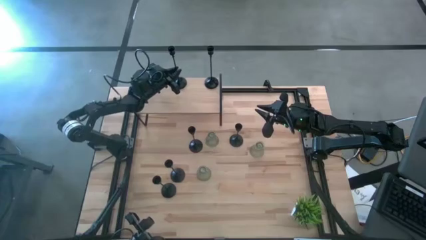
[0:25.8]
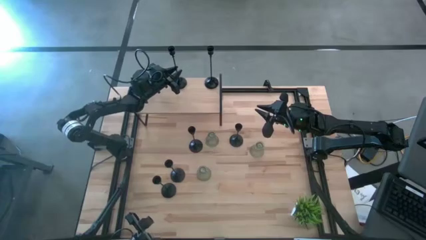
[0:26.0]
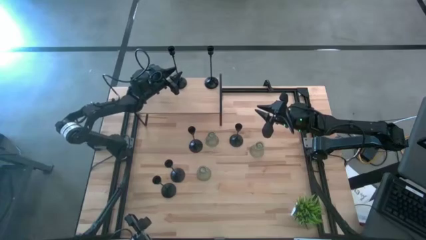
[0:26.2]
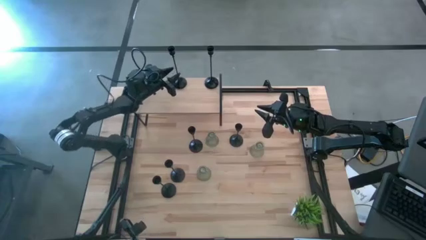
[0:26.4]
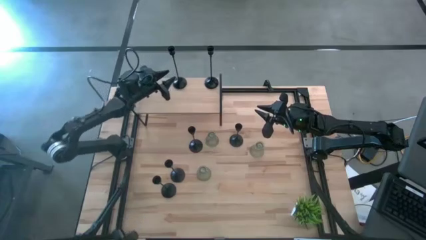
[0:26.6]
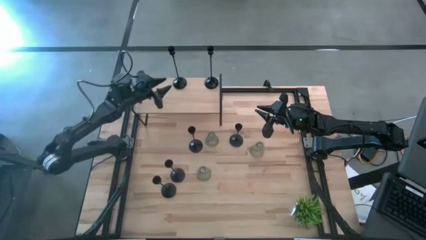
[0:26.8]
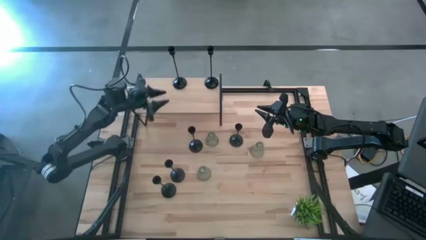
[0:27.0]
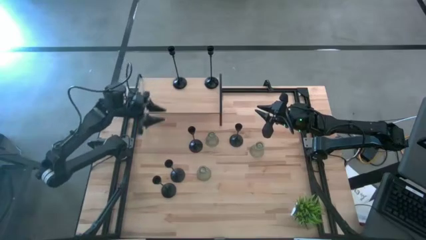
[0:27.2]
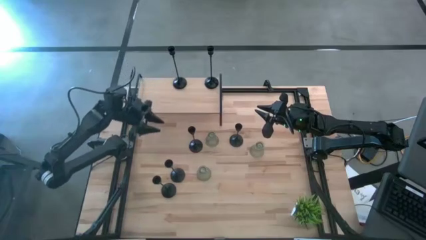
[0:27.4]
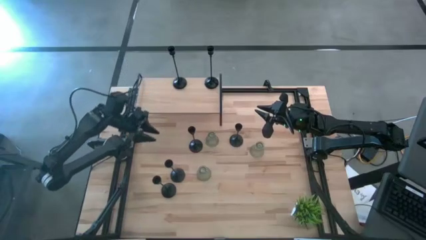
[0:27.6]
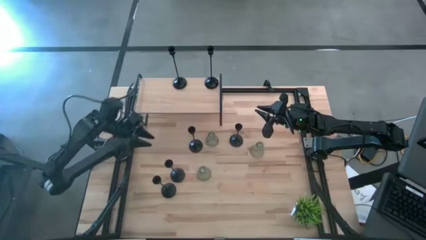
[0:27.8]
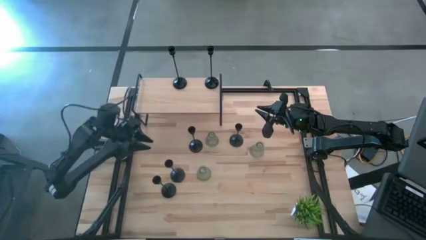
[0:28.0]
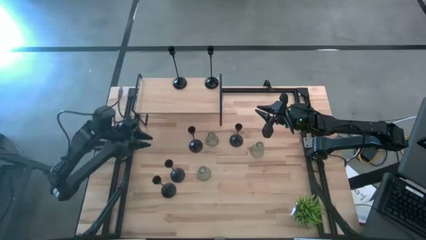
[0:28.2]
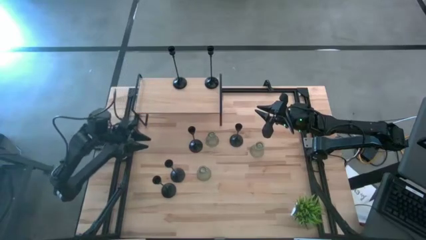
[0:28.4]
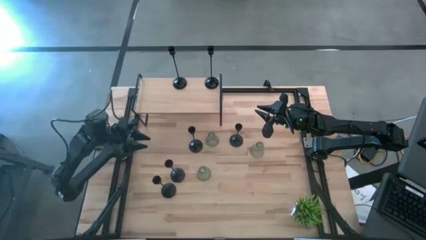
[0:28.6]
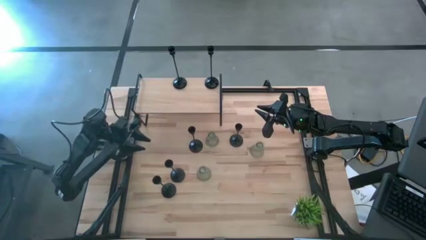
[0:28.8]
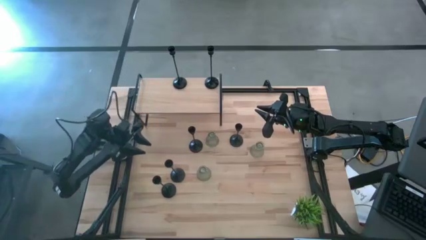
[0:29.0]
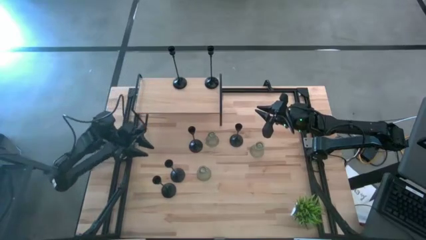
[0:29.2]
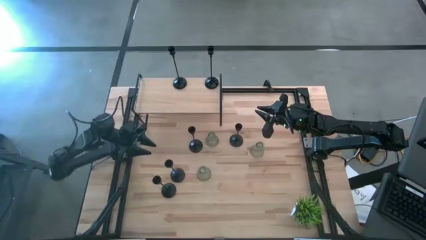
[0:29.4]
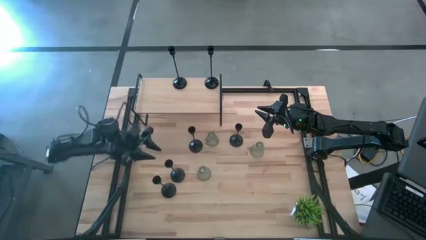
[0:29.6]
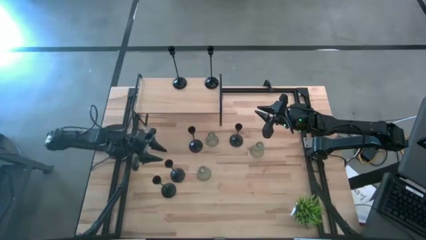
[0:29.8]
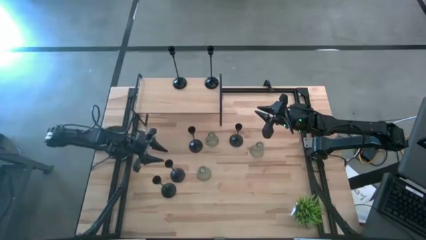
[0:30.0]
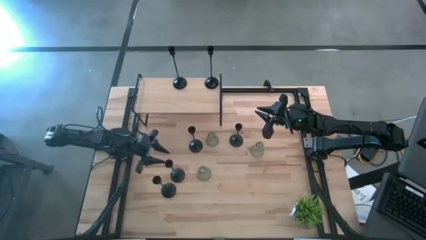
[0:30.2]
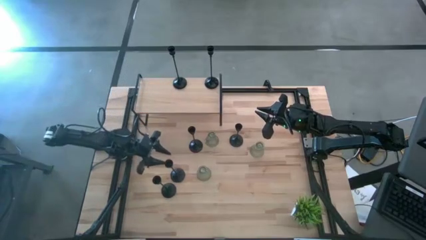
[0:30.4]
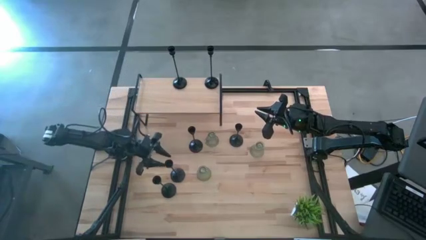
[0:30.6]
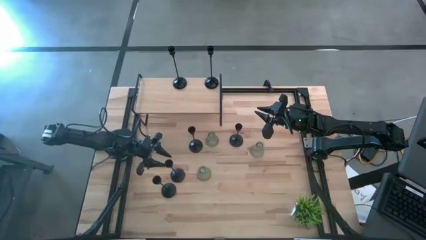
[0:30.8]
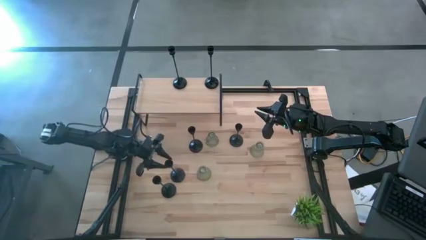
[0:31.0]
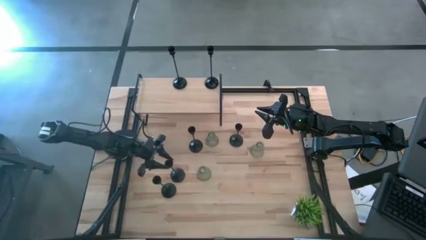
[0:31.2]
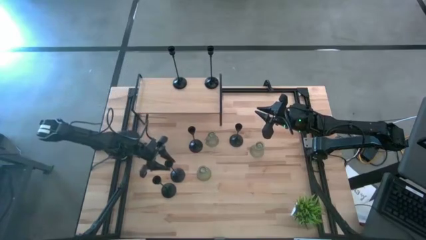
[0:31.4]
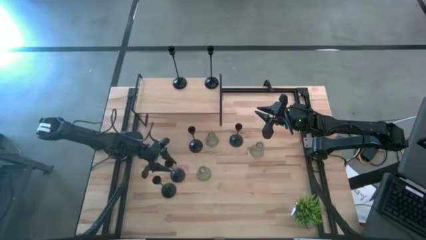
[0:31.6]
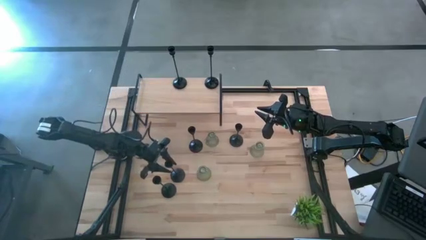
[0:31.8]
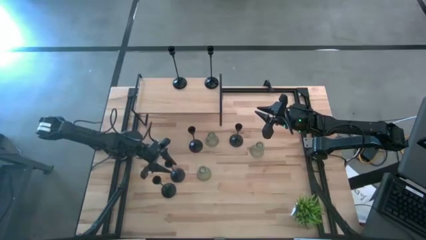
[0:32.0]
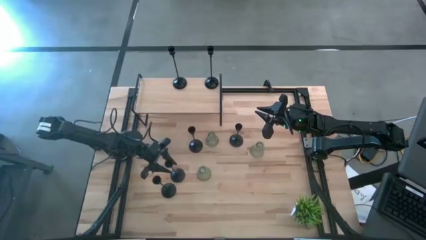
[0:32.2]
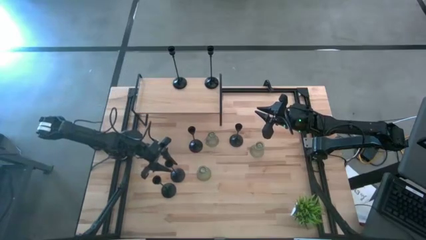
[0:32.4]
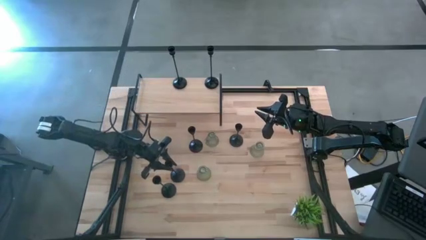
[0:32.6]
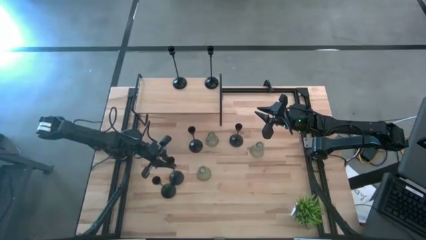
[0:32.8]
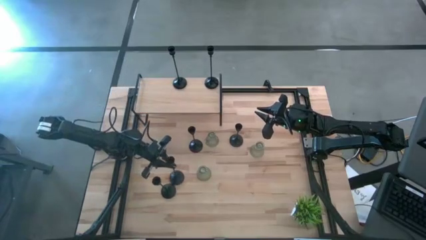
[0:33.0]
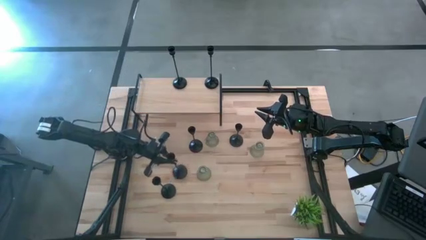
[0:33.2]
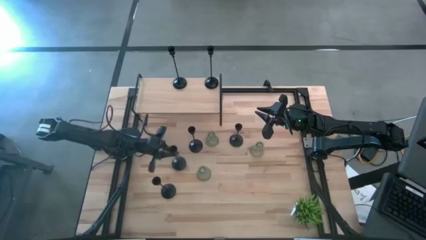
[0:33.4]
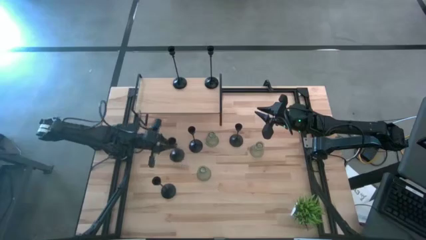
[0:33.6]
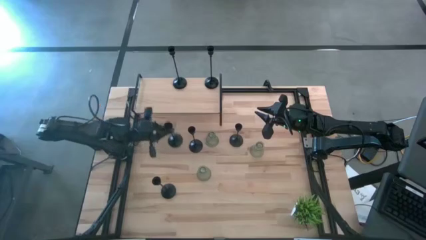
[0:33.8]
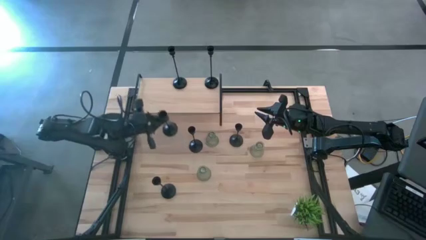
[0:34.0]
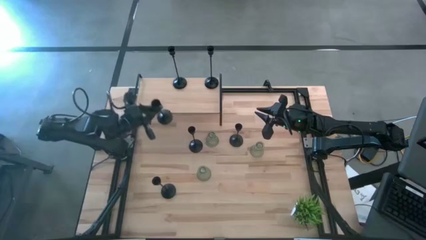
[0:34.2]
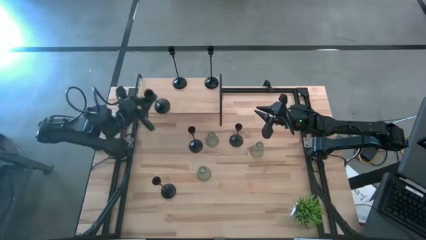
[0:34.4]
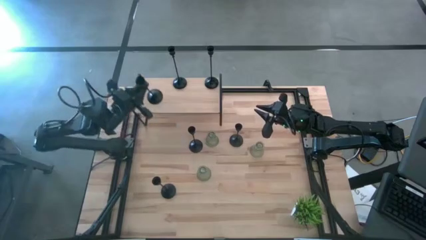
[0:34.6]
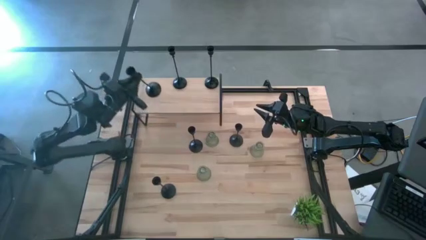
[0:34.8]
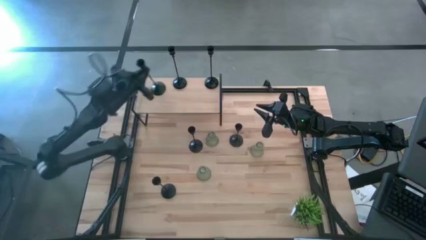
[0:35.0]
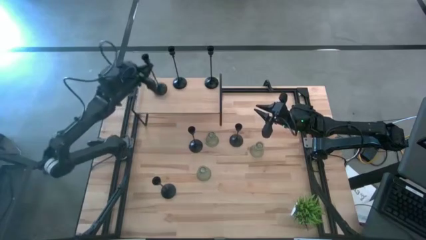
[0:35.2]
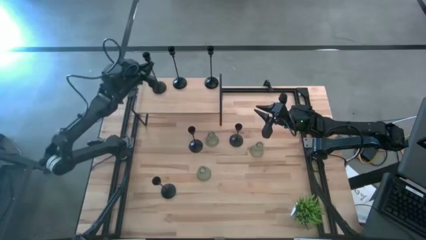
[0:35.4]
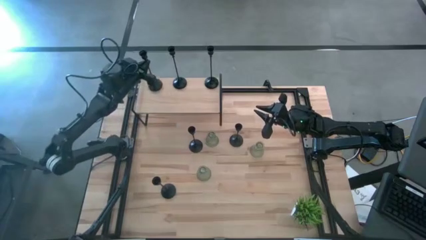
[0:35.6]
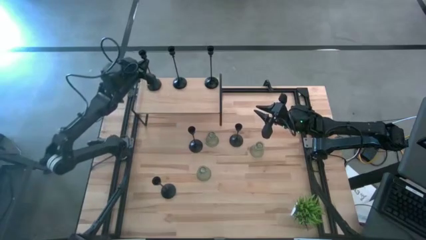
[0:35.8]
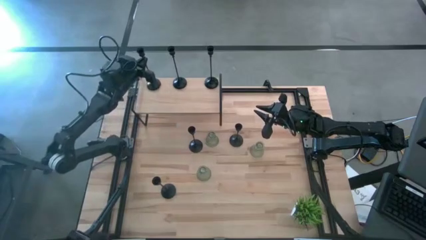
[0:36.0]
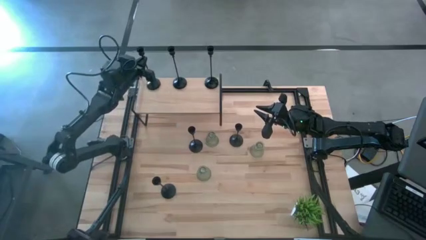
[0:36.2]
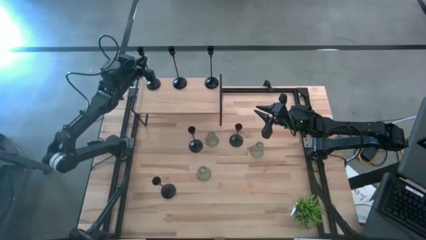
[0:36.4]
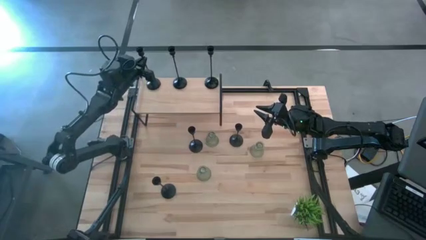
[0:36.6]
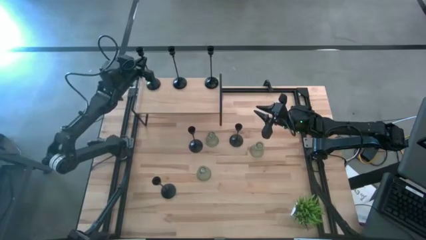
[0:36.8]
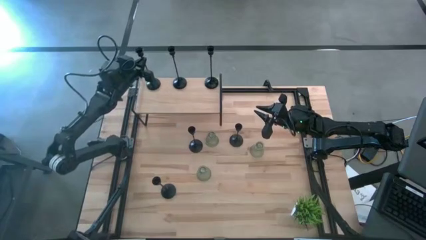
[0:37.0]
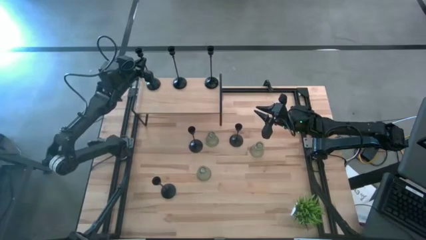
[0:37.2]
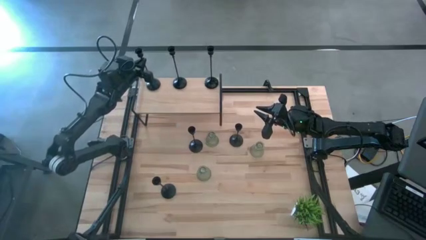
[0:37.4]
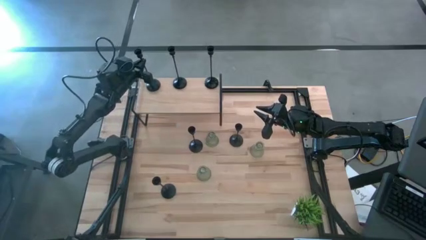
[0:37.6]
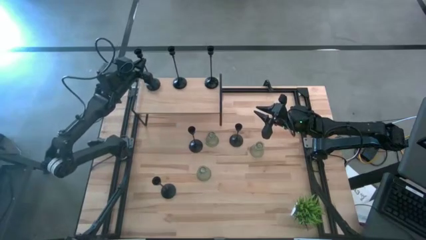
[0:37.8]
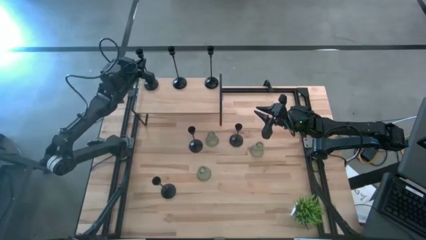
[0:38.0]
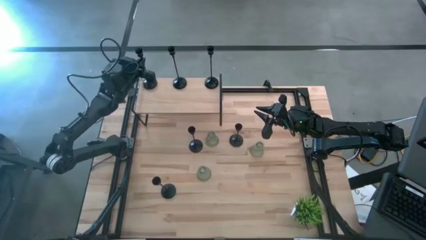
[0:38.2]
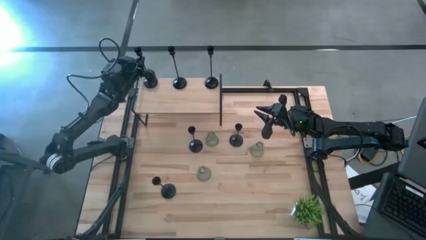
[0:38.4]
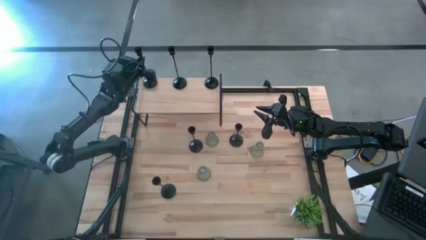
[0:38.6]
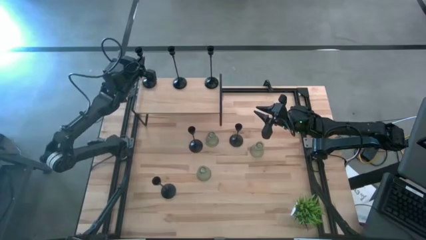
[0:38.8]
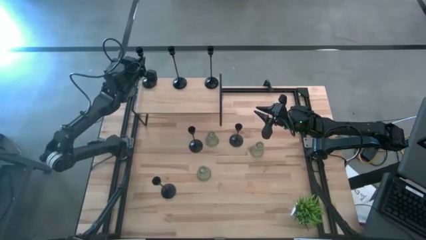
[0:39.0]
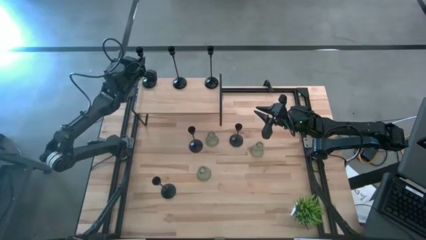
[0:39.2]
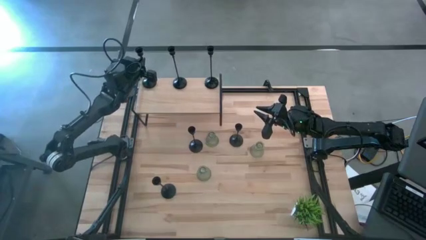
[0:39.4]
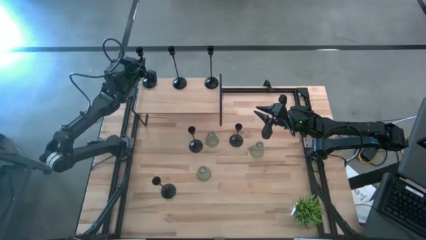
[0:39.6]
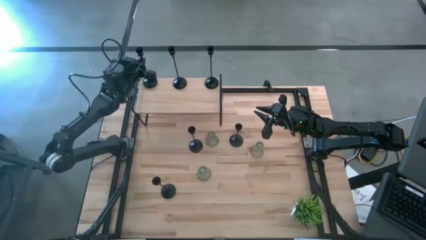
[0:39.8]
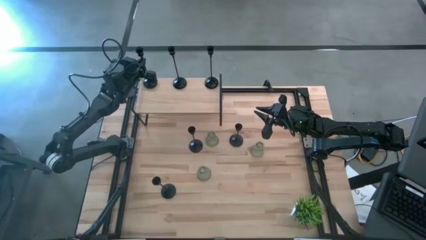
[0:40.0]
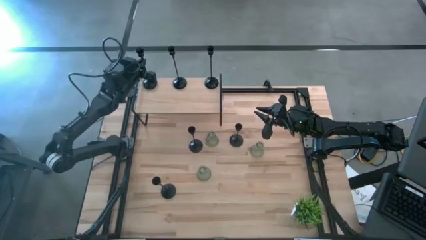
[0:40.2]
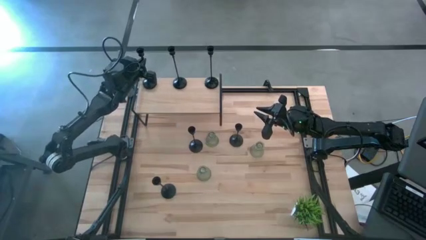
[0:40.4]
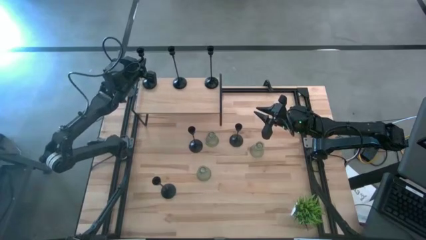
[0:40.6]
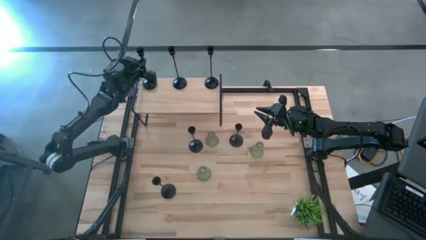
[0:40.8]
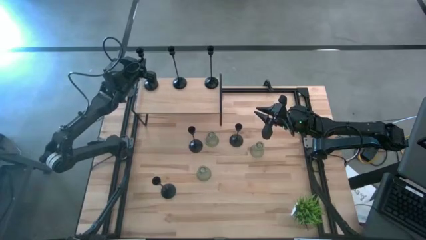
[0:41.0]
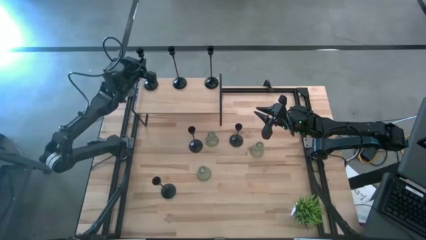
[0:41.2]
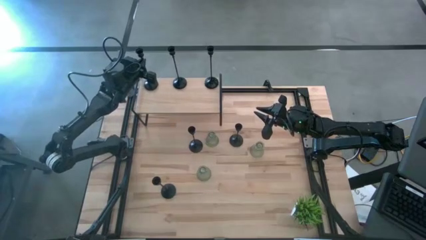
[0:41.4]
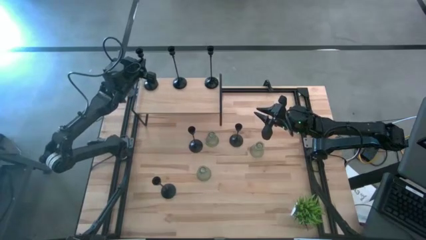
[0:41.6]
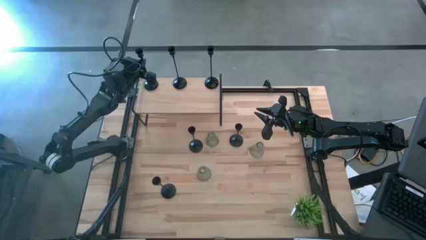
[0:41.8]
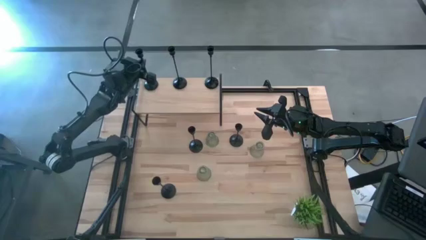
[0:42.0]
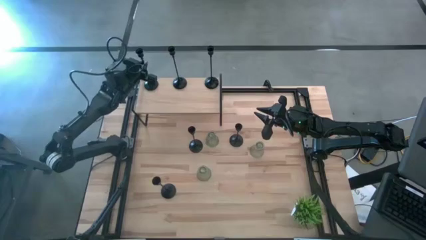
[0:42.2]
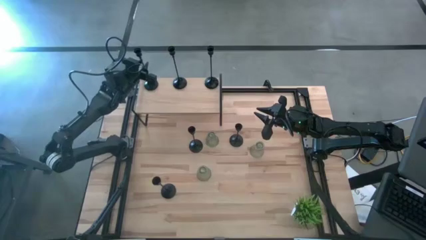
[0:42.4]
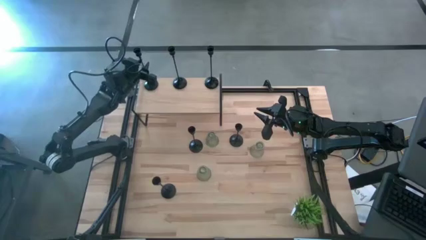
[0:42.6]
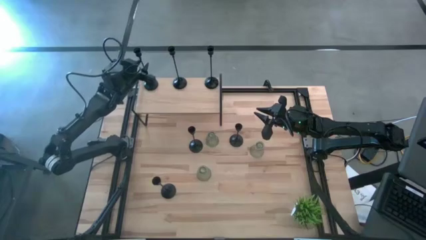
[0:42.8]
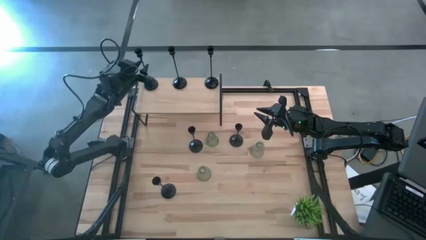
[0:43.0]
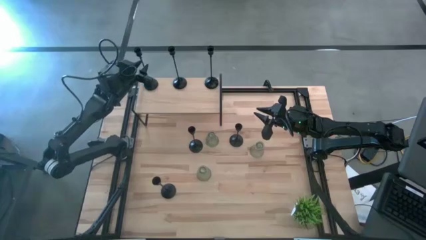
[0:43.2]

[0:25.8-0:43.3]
Task: Pick & Place candle stick holders
Put the large black candle holder on the shelf
